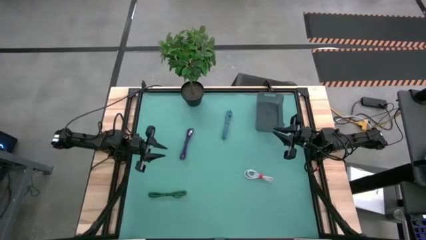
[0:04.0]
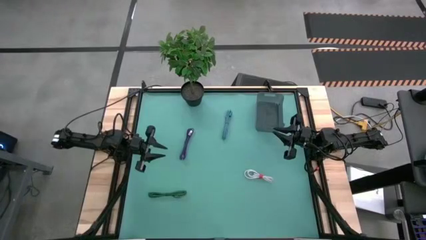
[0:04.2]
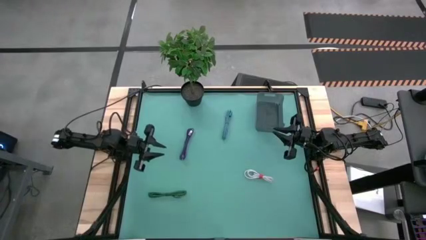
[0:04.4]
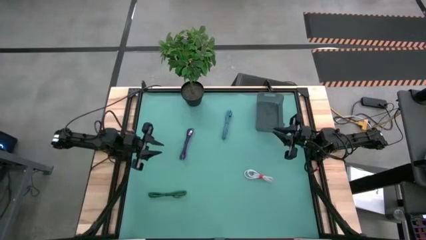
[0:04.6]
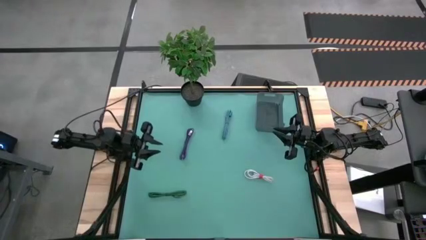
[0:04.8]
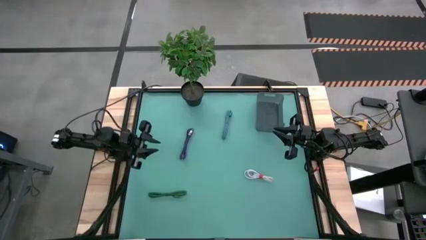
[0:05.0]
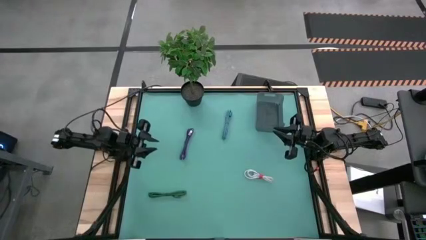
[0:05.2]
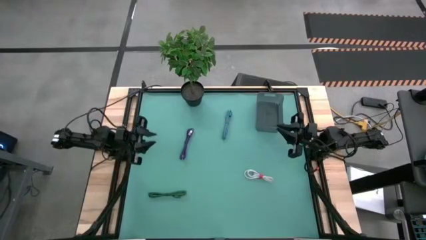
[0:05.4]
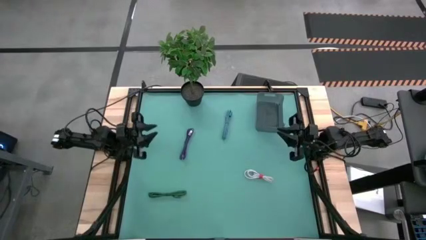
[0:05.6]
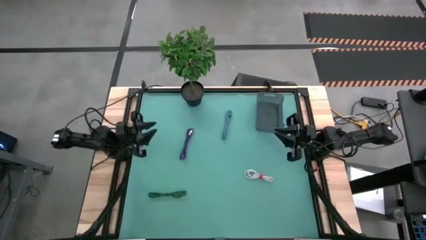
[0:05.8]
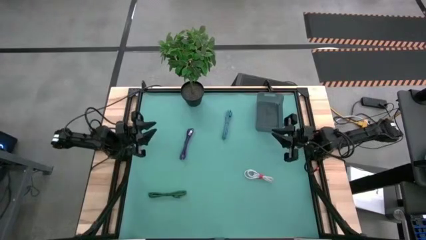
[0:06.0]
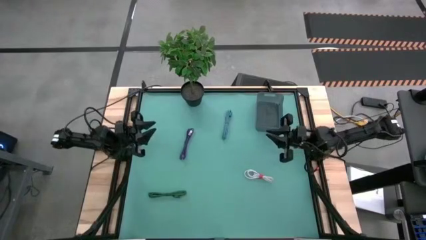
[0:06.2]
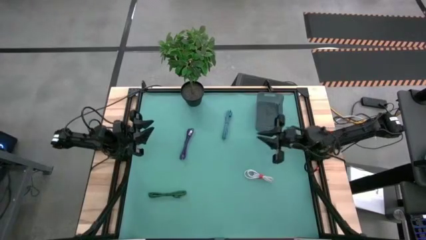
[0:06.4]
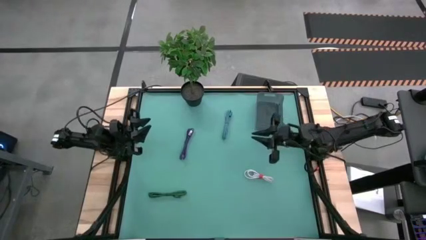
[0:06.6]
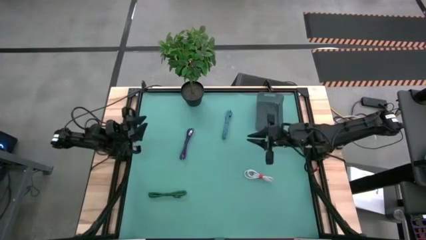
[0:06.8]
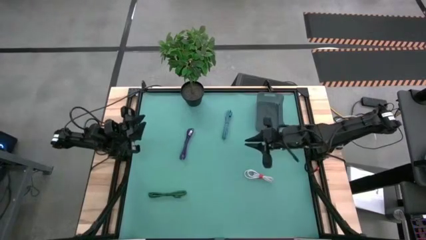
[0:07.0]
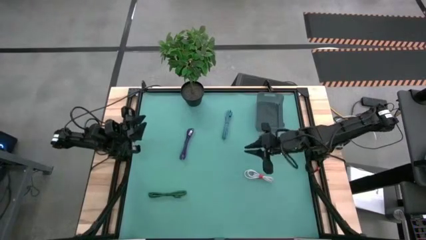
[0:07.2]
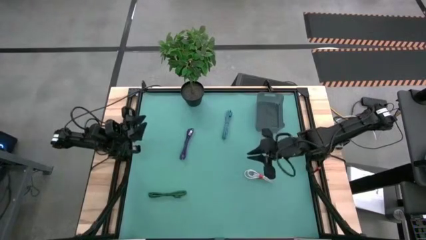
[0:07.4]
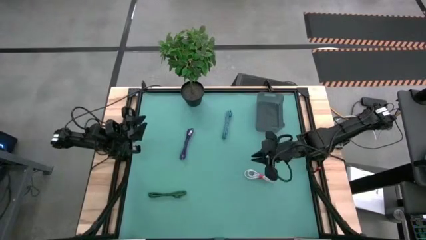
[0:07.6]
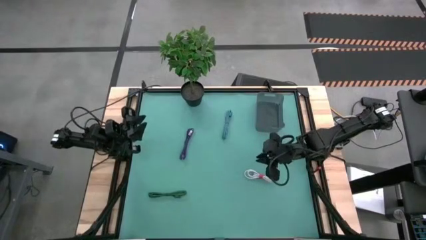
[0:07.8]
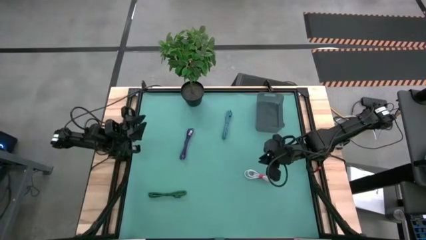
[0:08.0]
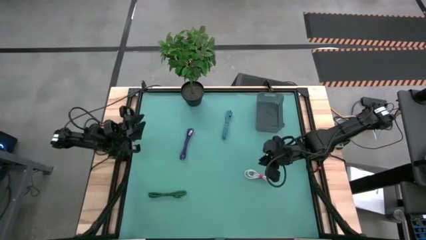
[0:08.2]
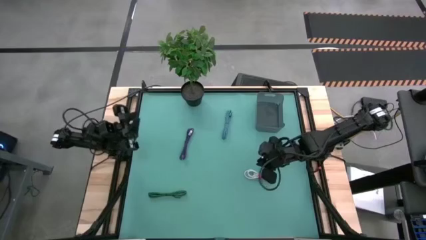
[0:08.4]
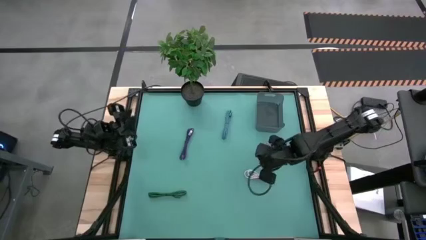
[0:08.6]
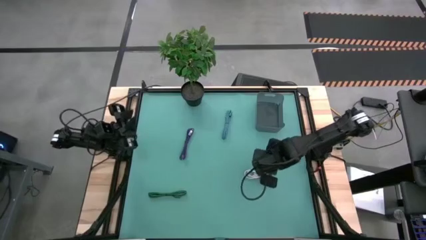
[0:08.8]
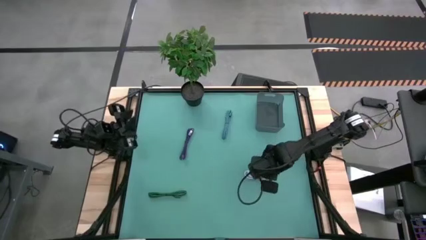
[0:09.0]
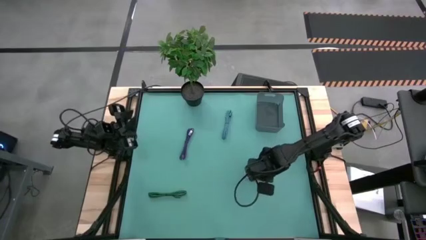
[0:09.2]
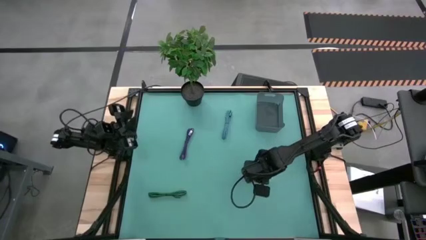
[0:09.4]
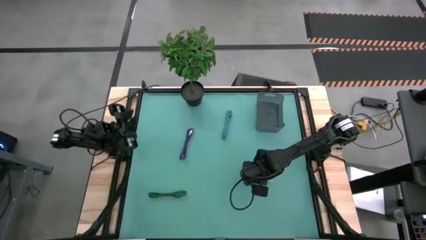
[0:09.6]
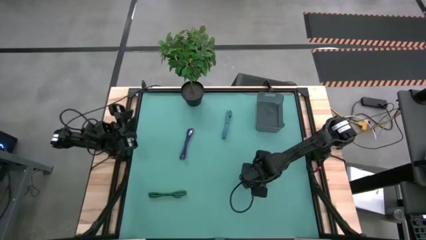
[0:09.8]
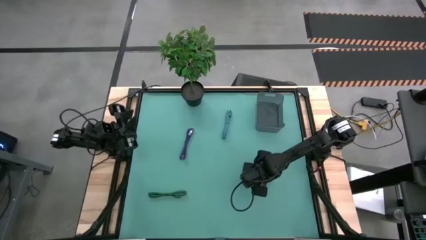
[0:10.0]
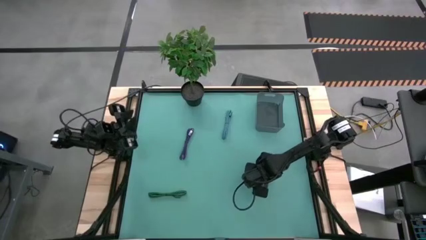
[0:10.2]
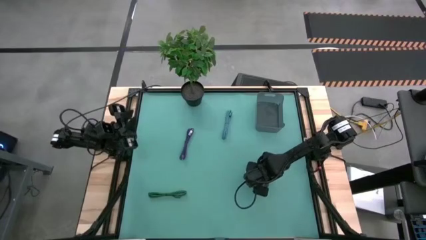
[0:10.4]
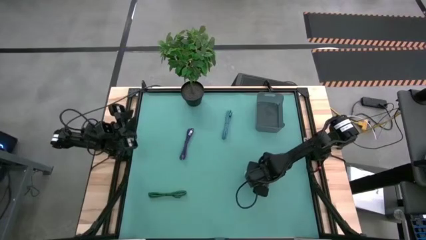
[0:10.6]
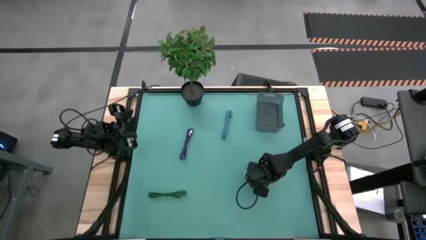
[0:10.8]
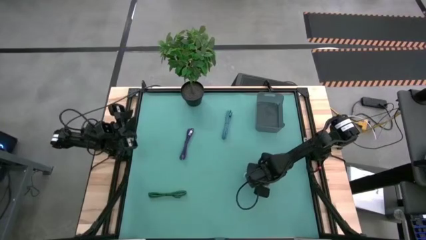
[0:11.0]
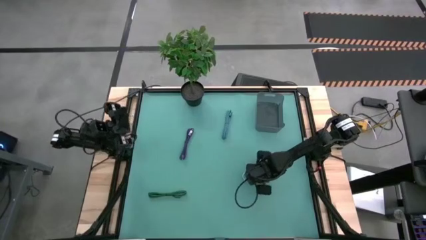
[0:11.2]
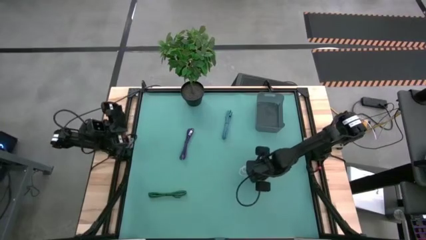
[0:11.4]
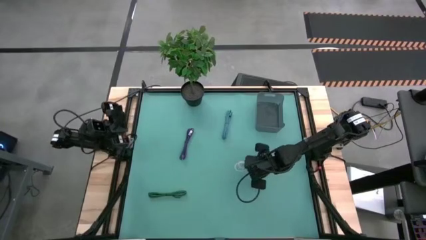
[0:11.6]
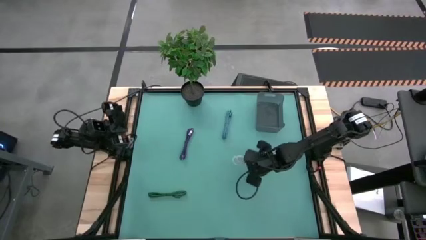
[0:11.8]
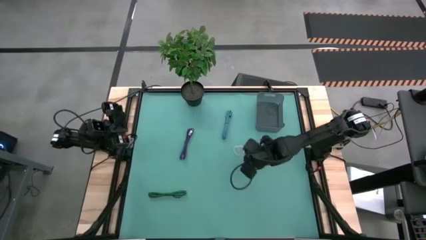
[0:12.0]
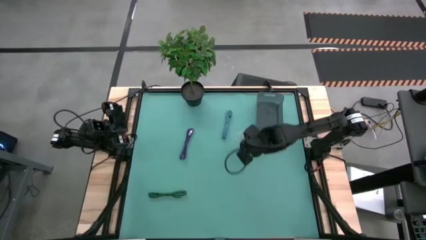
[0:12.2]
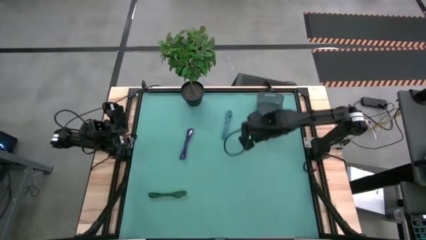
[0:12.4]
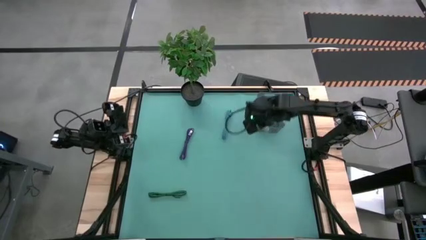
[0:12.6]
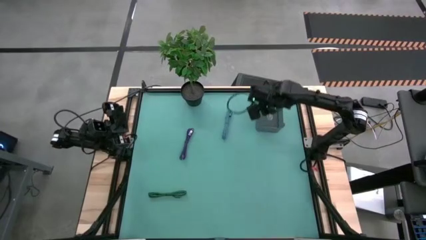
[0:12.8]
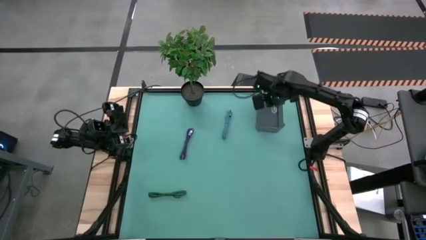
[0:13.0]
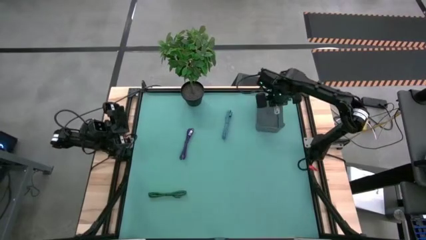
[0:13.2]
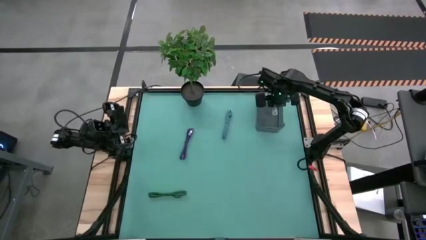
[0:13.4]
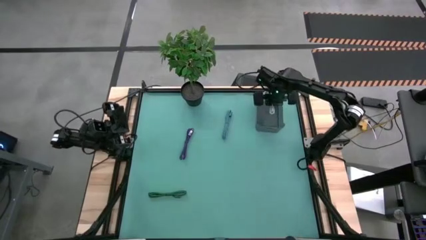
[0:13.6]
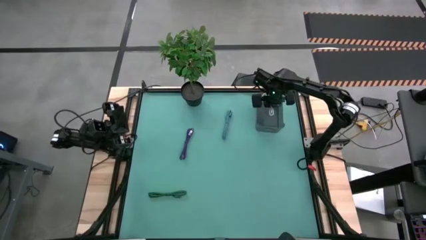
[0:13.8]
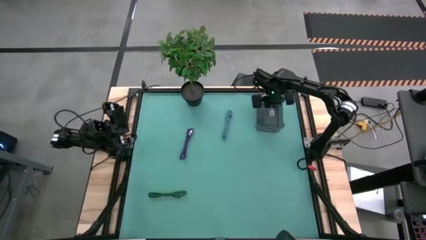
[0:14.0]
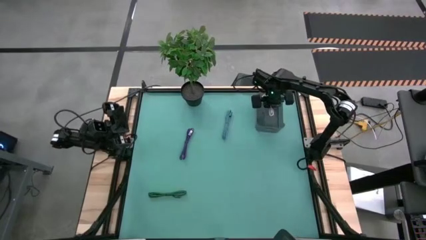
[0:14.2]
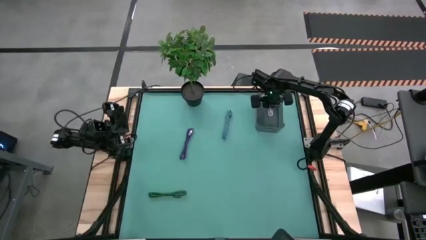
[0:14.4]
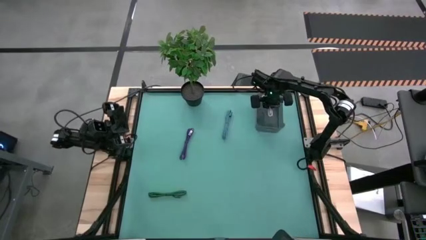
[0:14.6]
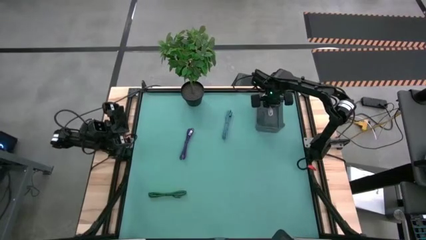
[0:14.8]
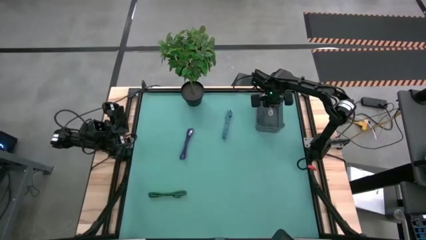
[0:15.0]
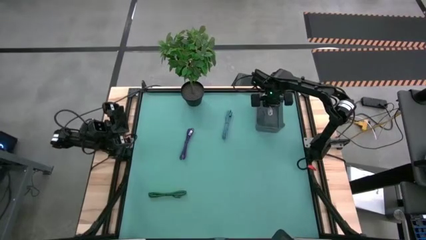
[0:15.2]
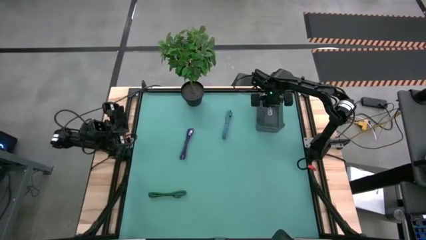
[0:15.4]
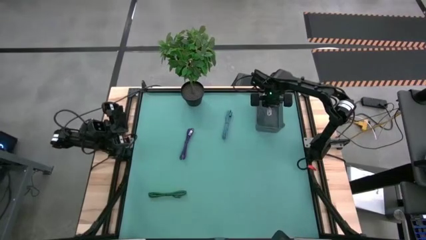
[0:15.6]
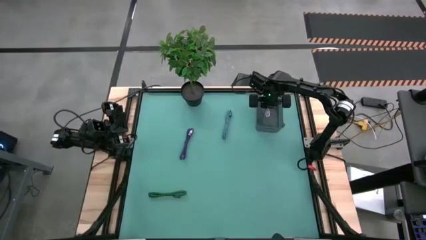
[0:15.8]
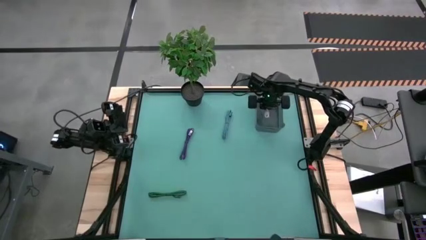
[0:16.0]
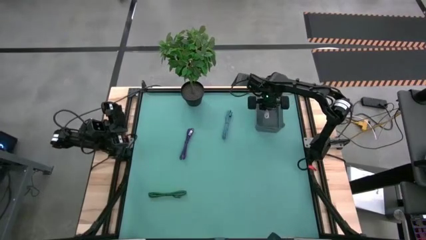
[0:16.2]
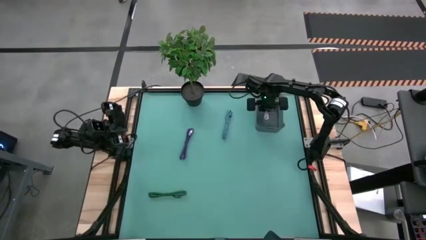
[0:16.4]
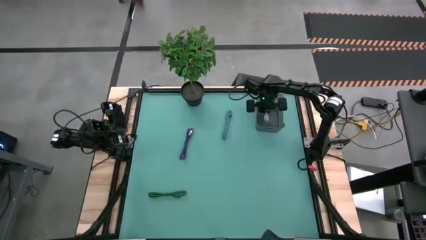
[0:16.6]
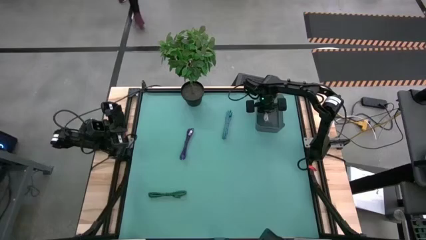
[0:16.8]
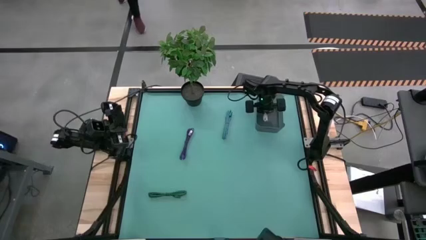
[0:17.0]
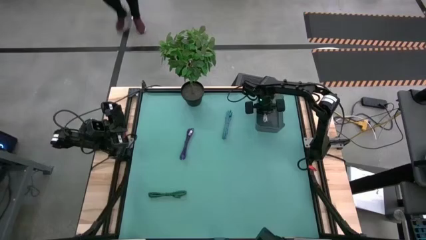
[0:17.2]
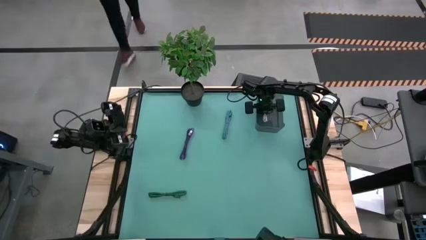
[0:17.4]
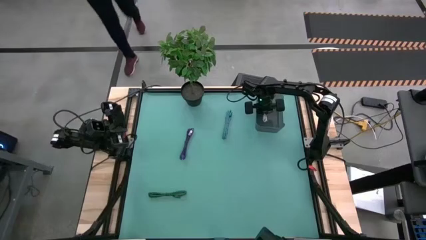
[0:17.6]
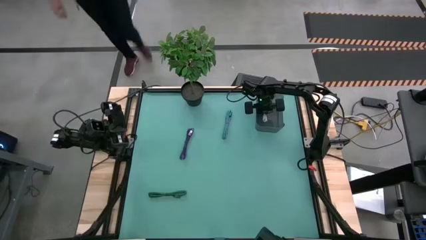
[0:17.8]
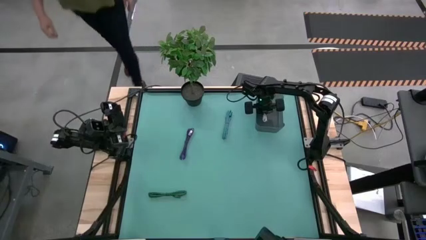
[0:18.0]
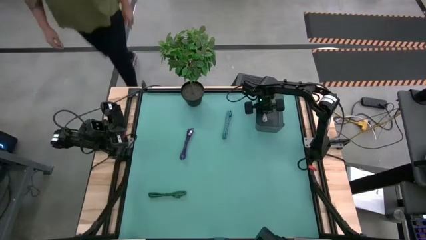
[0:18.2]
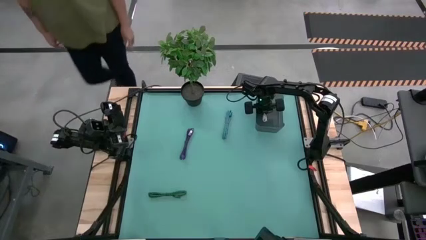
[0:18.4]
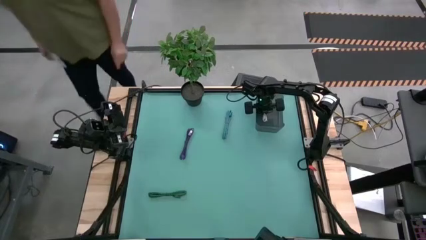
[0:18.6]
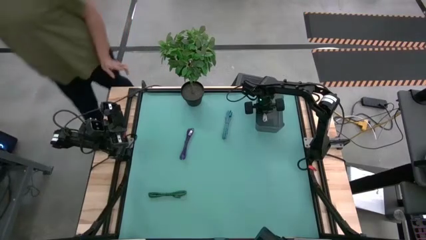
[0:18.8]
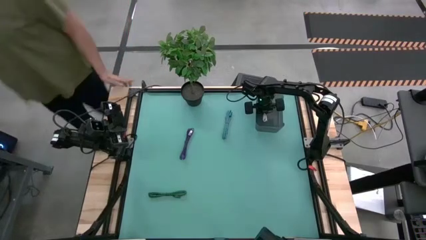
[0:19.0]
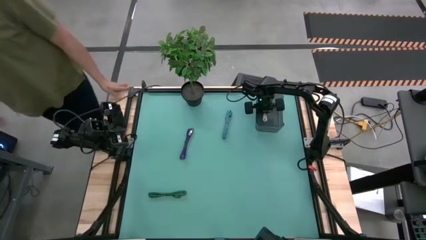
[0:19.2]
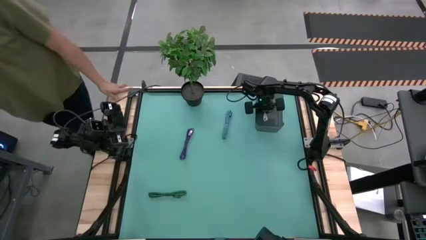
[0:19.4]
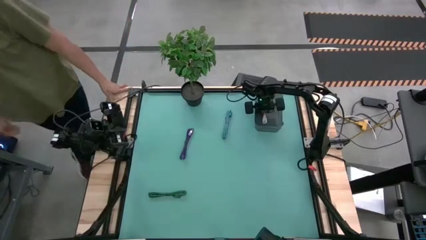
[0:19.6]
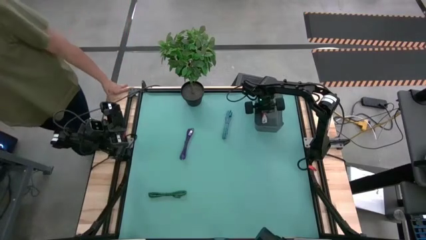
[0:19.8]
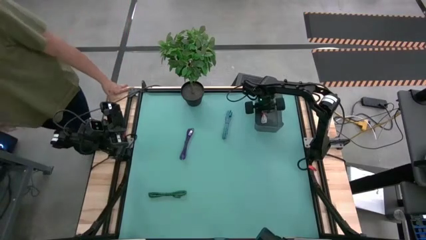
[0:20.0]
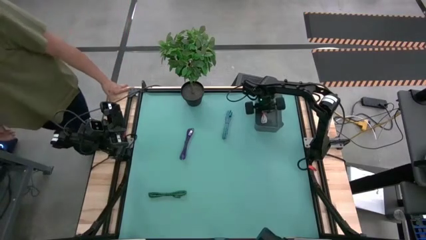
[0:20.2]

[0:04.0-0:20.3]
Task: Pick and place USB-C Cables
Put the white charger cable into the black bin
